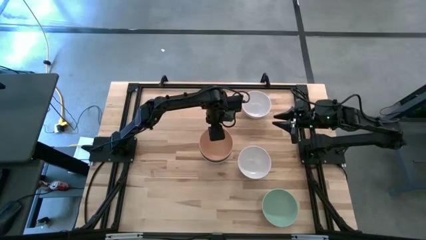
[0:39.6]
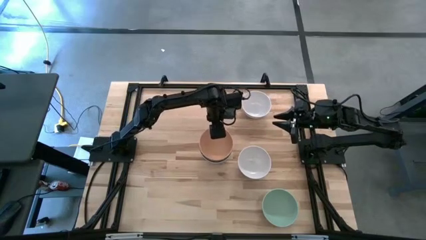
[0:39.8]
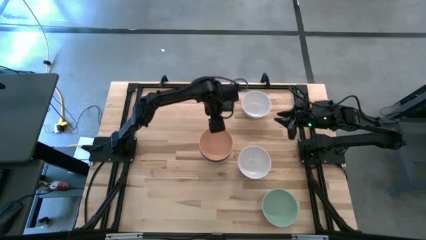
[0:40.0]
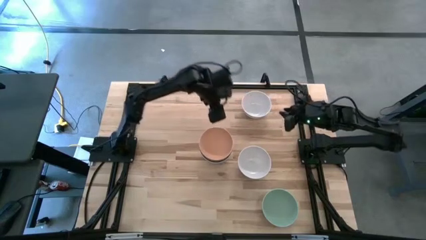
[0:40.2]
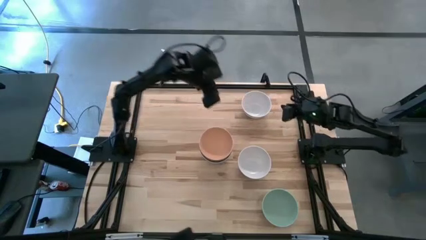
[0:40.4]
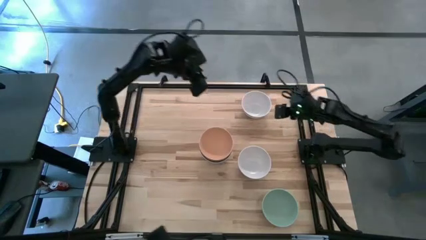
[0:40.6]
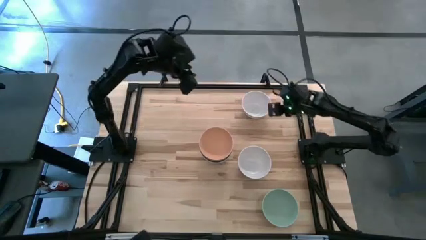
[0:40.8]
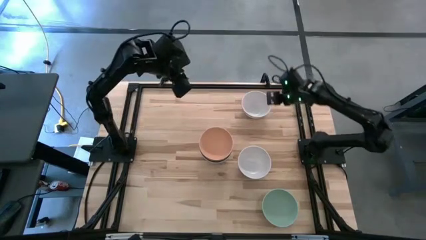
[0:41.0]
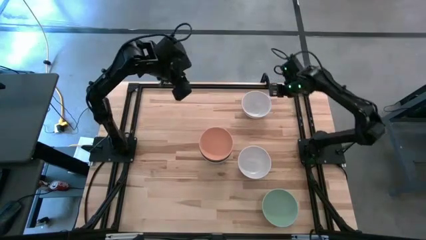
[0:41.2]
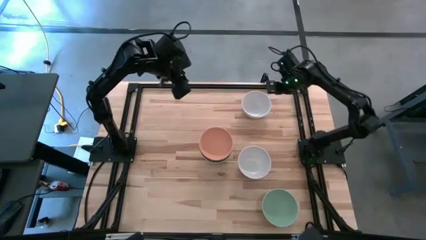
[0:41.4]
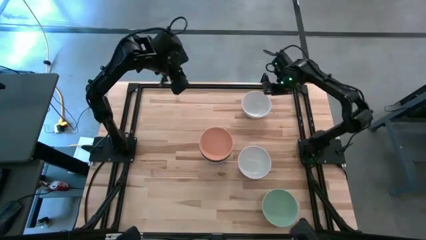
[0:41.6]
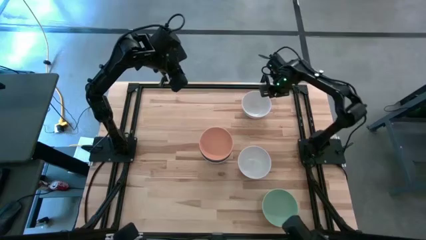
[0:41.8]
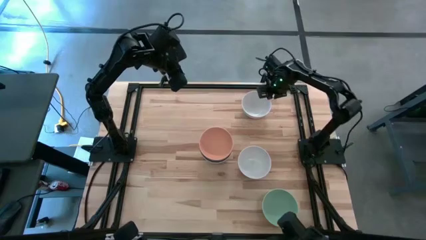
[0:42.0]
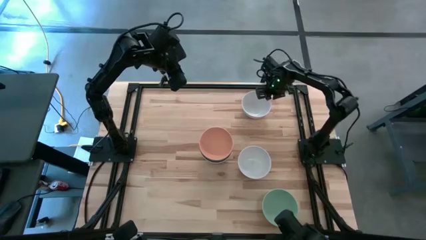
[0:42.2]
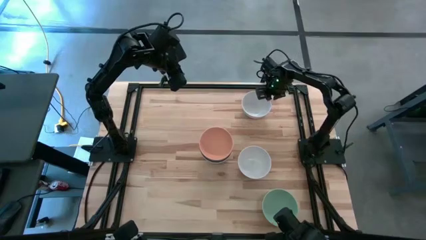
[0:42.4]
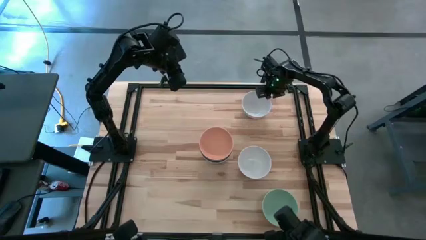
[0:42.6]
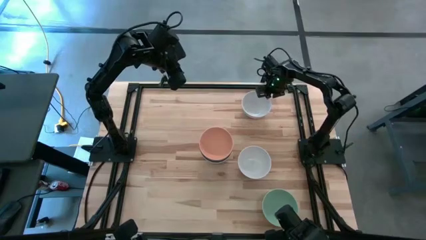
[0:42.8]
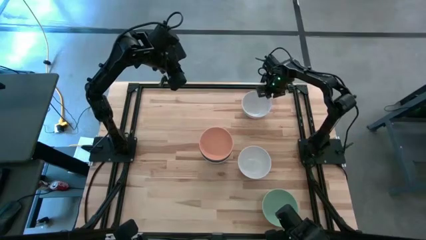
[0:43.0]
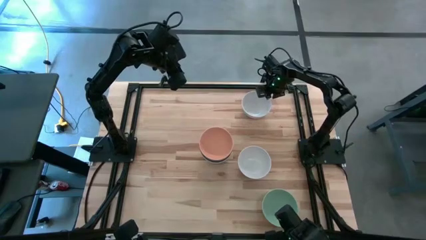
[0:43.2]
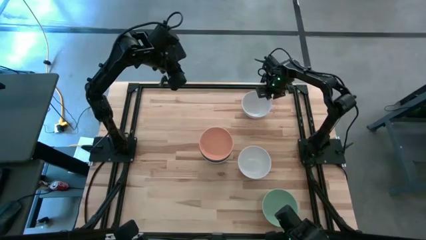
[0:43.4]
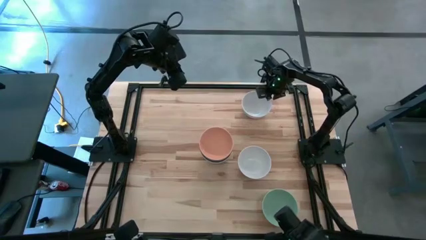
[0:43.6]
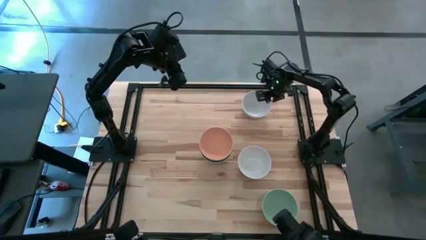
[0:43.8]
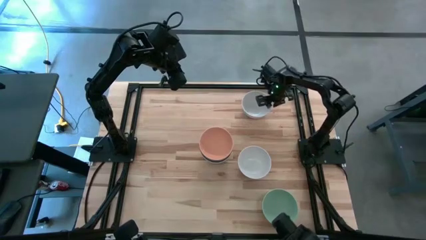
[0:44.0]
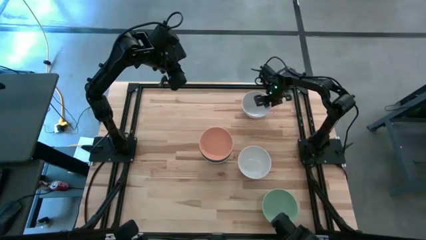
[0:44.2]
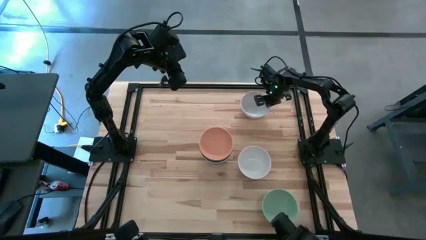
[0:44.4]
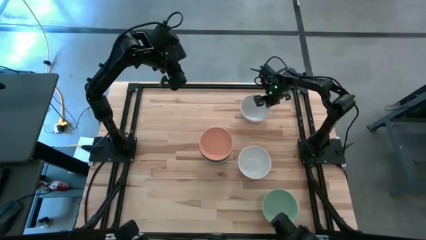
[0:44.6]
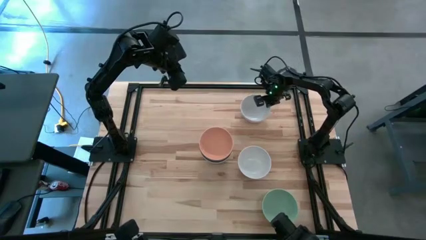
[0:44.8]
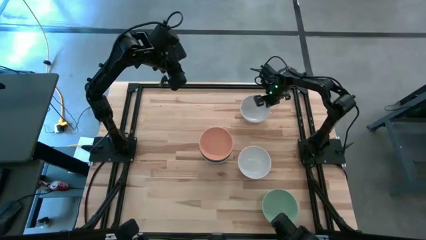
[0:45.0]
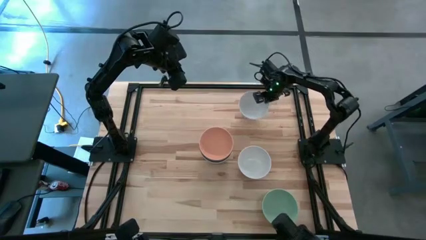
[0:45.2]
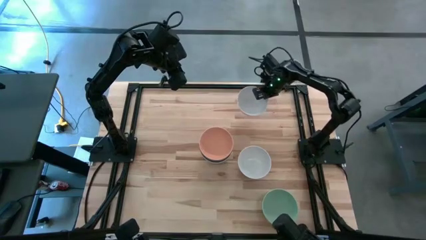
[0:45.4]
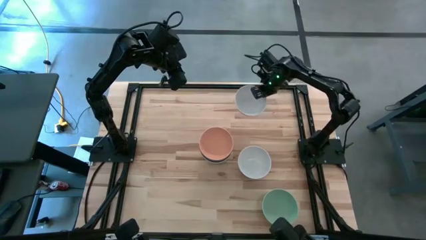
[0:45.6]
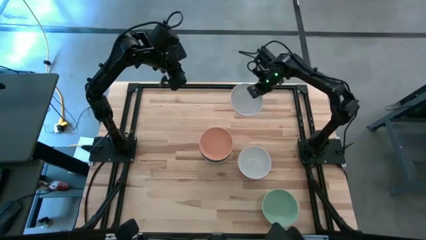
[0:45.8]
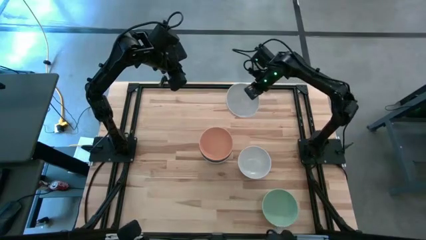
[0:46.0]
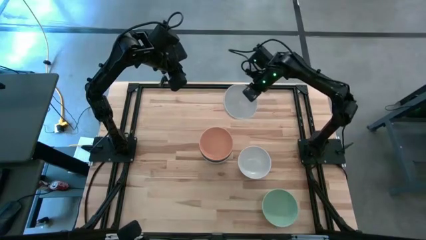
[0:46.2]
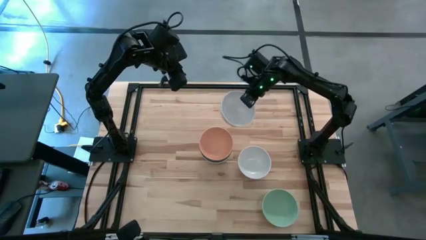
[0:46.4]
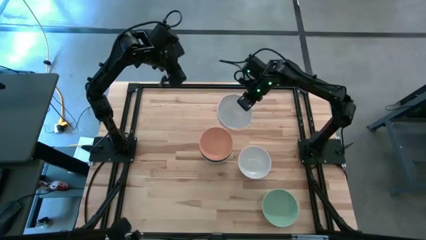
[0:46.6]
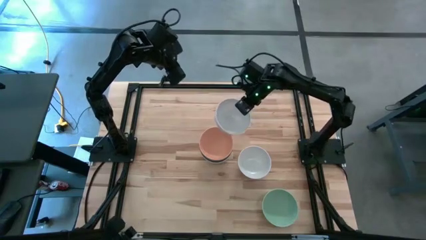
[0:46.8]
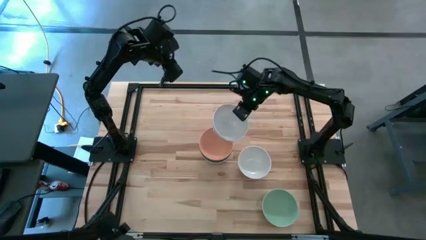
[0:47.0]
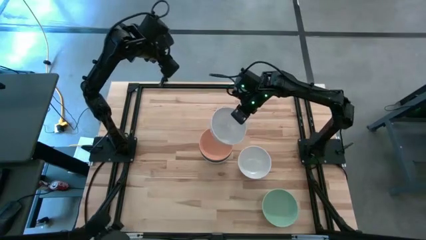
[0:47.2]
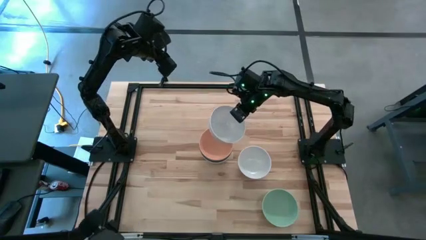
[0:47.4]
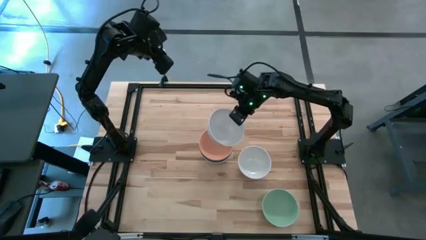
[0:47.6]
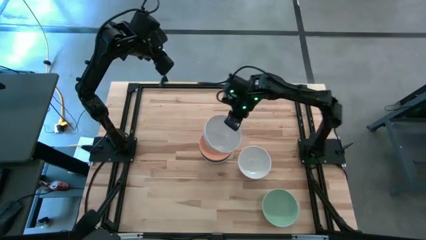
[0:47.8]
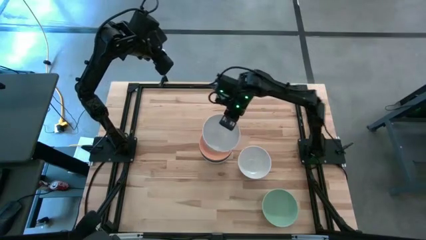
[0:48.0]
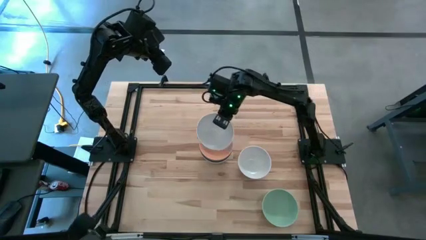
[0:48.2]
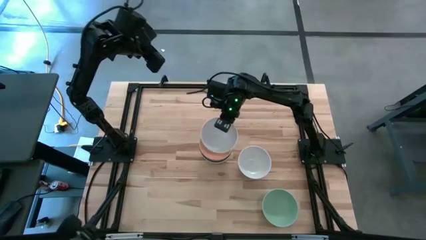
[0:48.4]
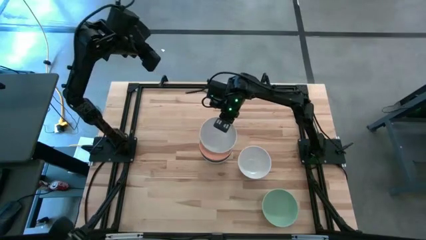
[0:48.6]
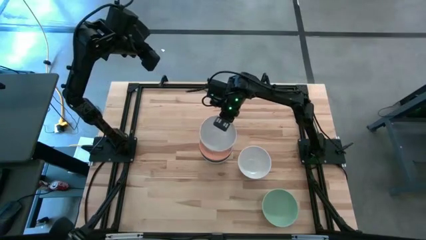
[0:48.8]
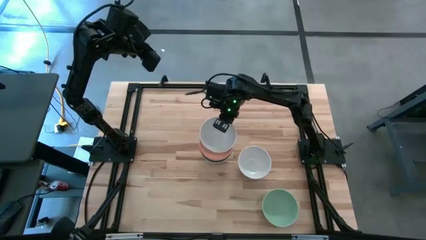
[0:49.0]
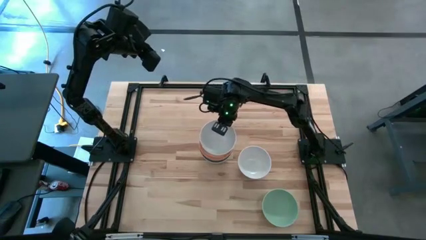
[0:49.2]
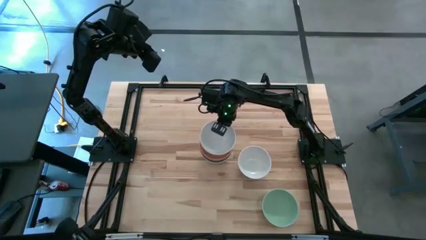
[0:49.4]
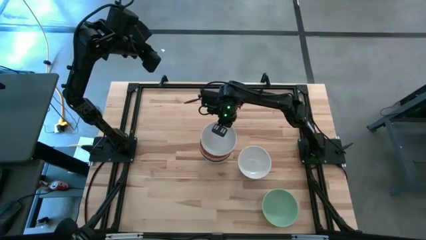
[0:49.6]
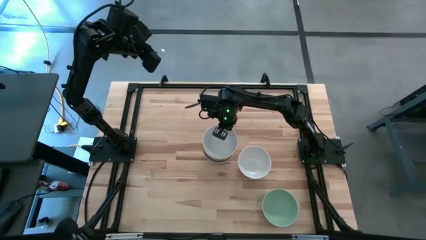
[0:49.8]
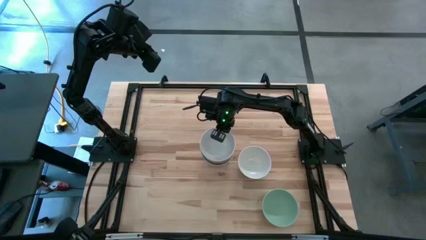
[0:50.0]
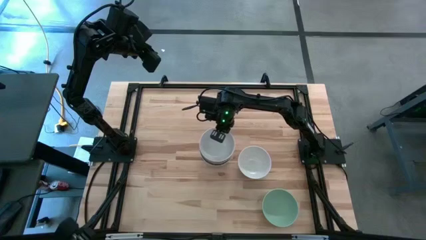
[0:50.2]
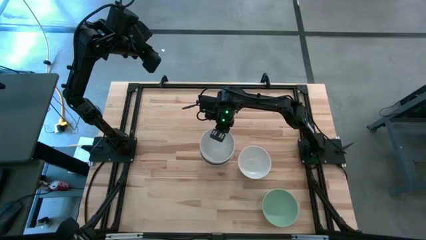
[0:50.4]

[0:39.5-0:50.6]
Task: Nest bowls inside each other
Stack the top white bowl on the light orange bowl

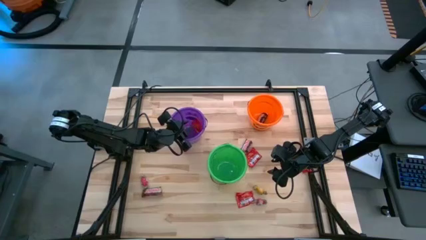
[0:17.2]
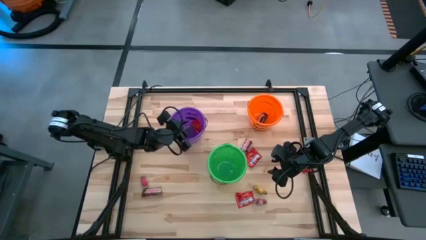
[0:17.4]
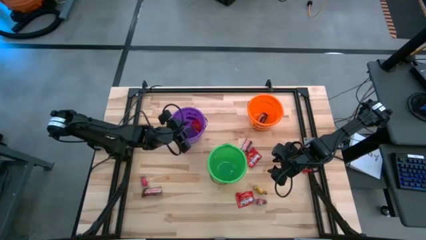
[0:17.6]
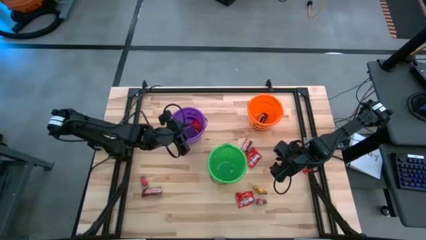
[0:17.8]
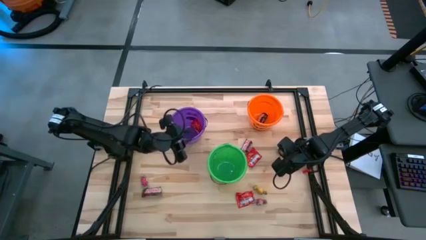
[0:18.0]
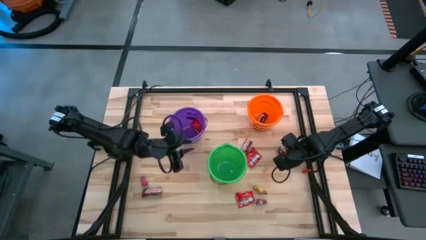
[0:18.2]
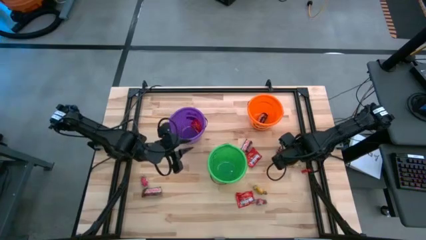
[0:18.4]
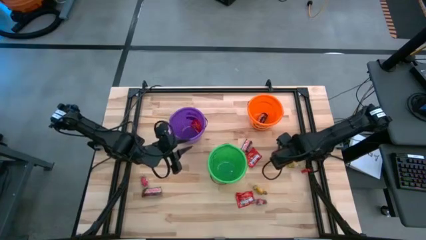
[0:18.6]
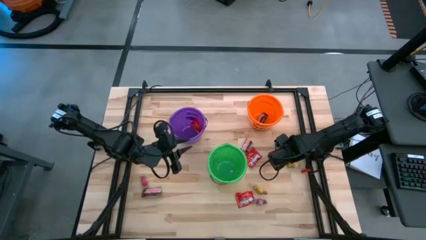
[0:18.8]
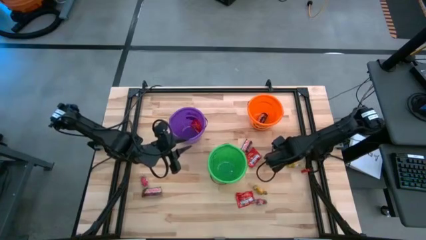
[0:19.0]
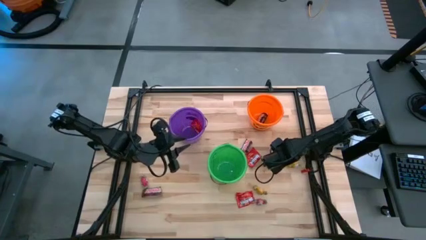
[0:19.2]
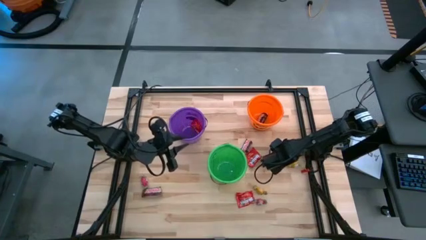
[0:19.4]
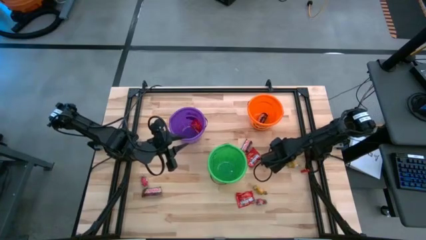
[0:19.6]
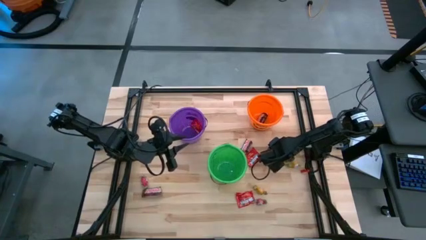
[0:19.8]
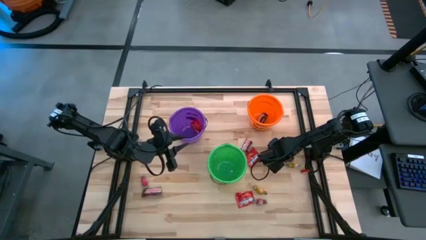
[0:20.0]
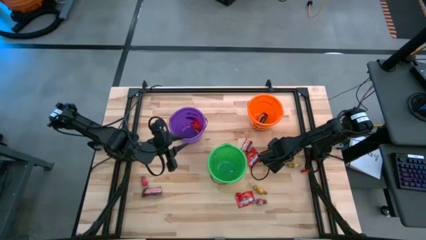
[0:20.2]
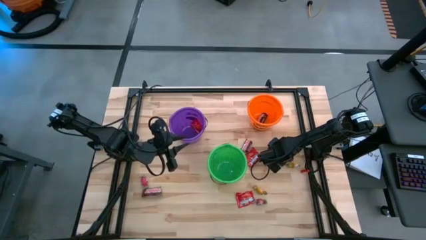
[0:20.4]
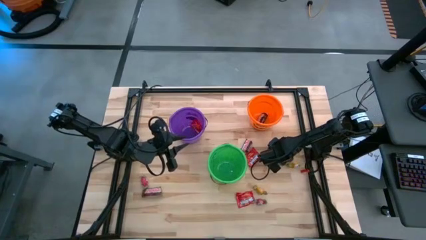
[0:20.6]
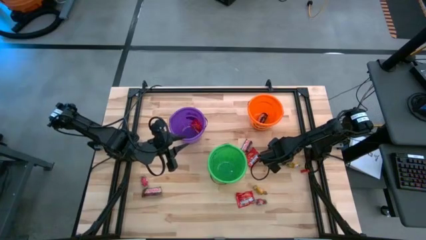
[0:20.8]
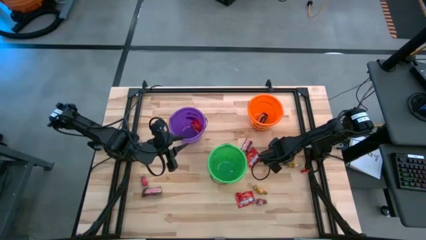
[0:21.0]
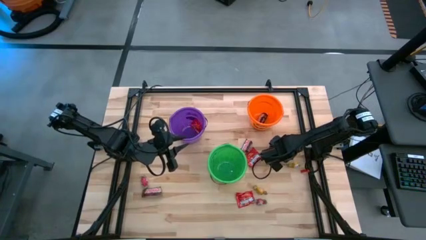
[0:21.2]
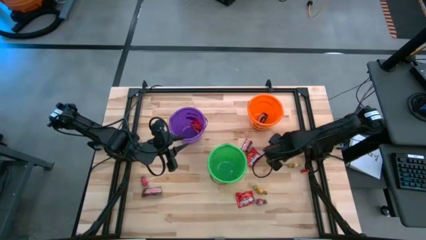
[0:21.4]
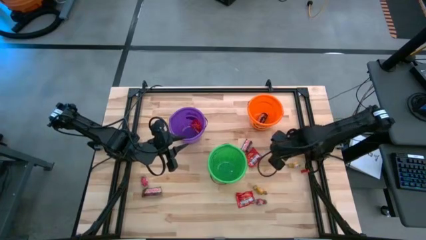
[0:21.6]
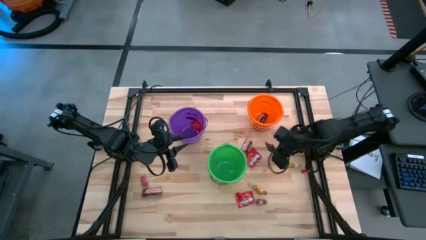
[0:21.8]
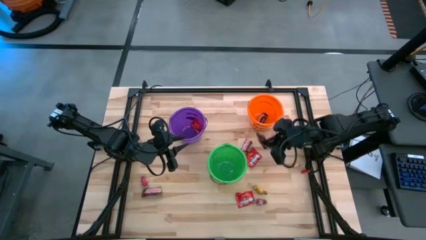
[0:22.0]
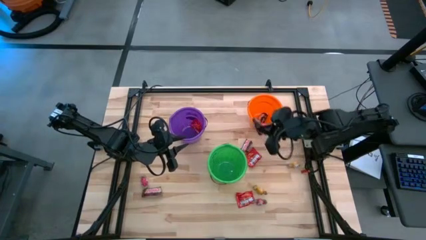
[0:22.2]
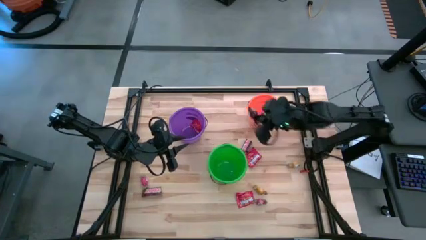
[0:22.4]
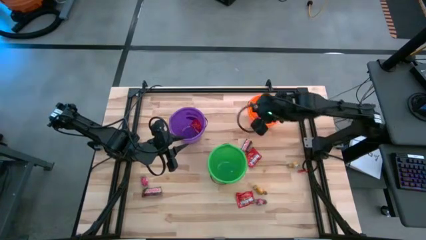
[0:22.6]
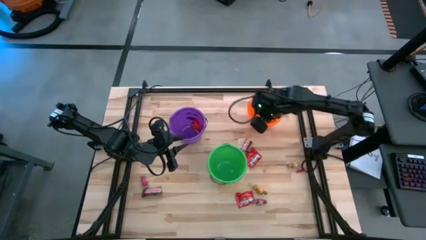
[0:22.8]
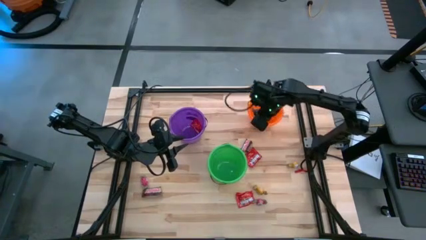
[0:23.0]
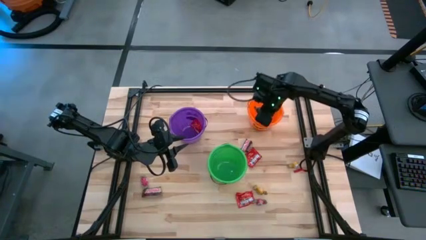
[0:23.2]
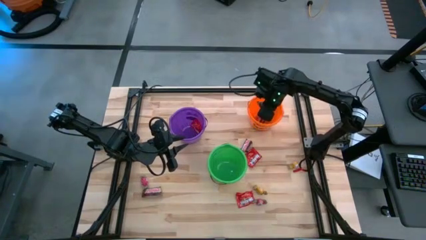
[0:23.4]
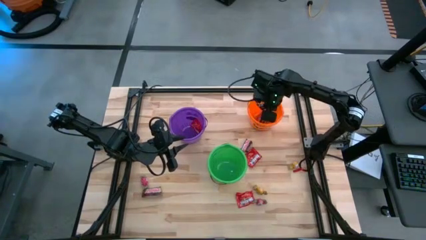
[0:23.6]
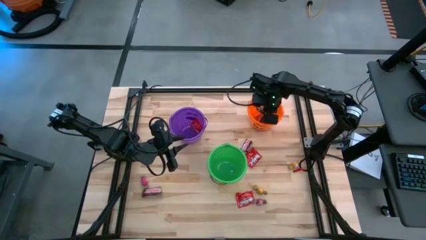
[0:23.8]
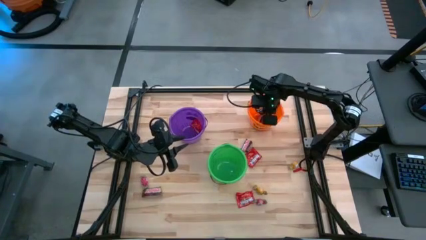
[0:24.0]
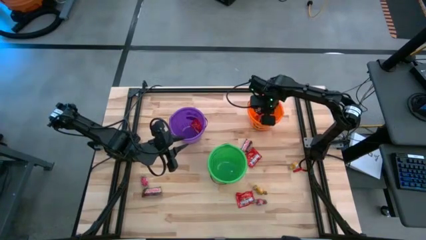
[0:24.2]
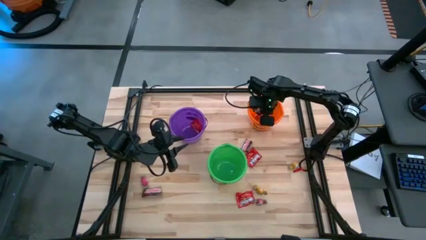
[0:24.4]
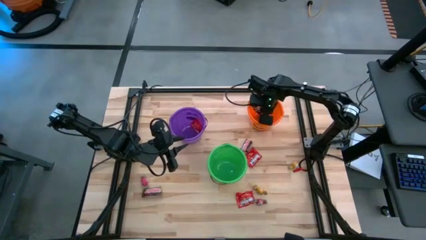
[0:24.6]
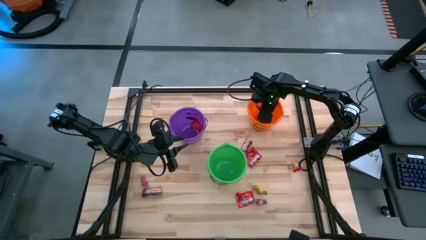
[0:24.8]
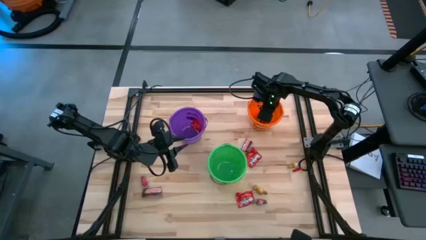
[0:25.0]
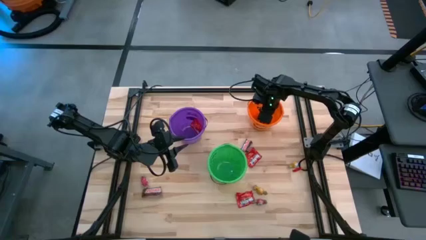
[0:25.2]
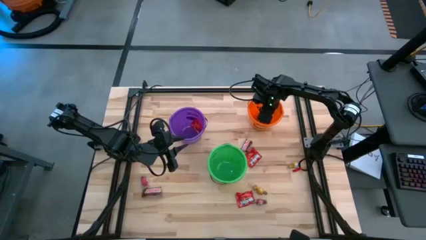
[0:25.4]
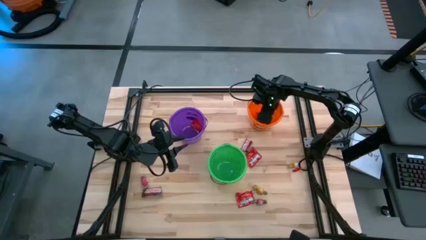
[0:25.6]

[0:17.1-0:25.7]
Task: Organize candy in baskets
Put the brown chocolate bar into the orange bucket
